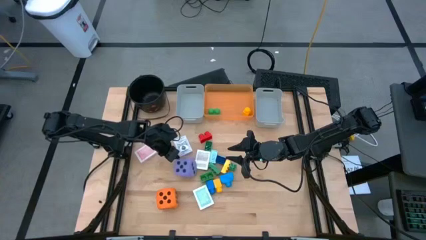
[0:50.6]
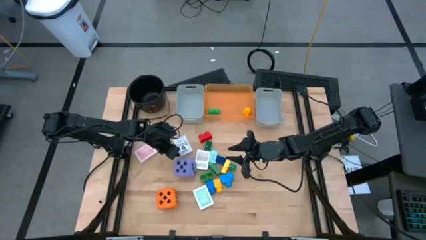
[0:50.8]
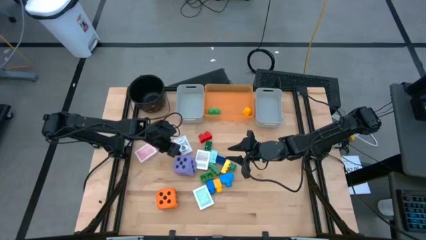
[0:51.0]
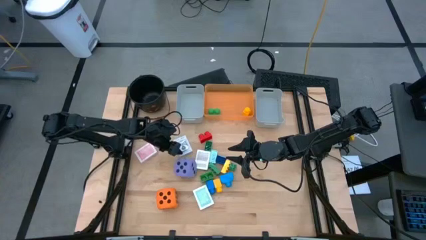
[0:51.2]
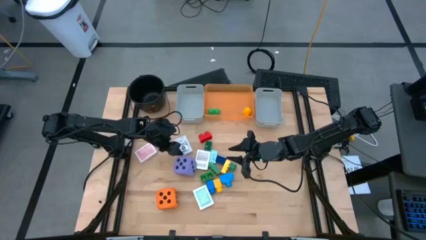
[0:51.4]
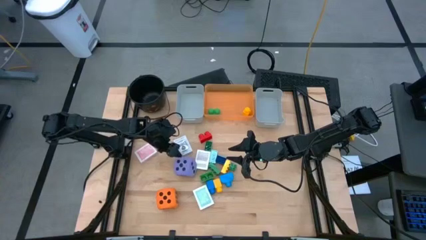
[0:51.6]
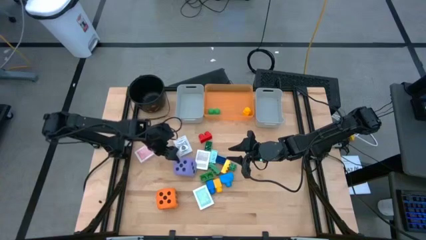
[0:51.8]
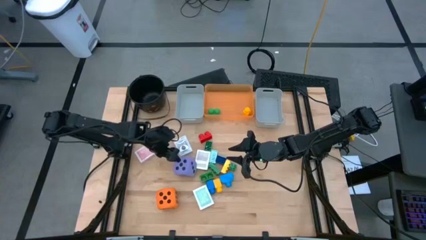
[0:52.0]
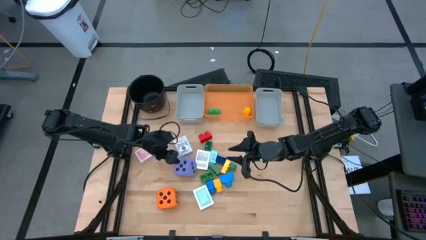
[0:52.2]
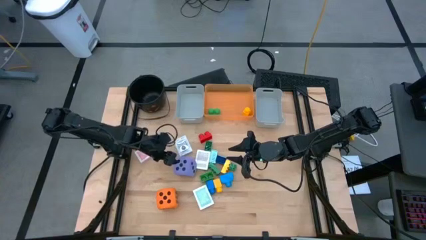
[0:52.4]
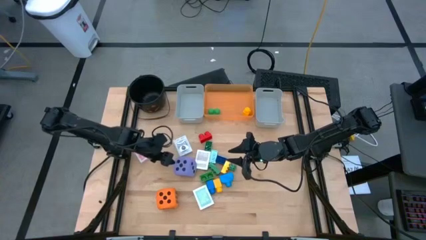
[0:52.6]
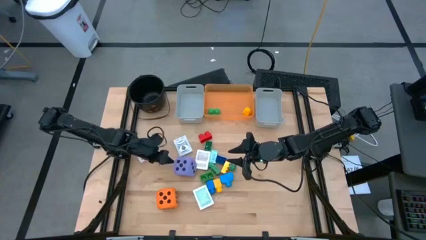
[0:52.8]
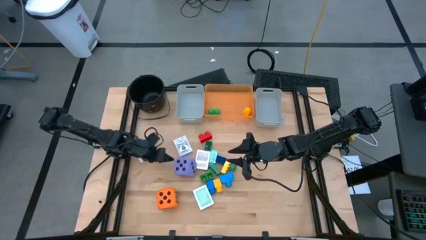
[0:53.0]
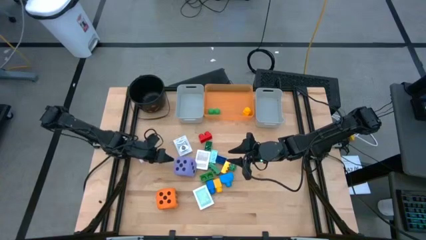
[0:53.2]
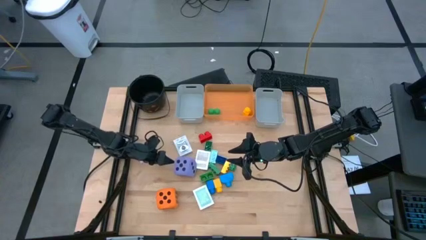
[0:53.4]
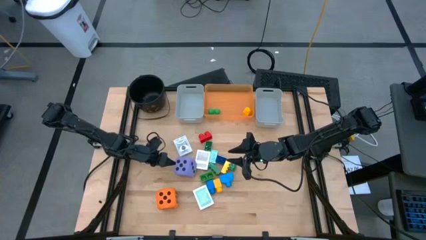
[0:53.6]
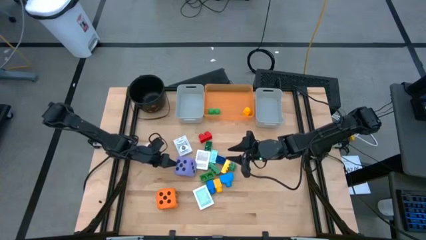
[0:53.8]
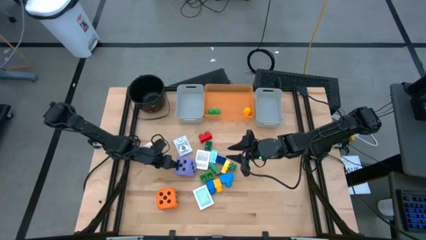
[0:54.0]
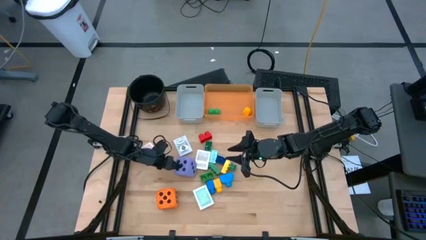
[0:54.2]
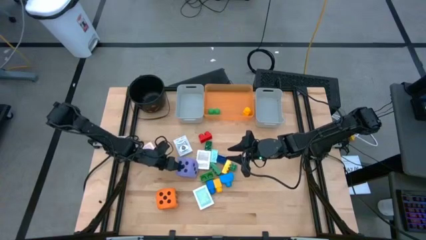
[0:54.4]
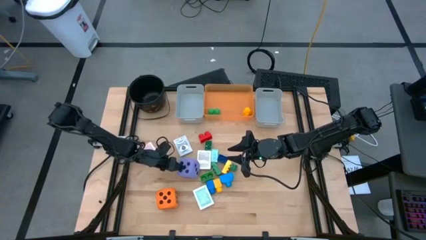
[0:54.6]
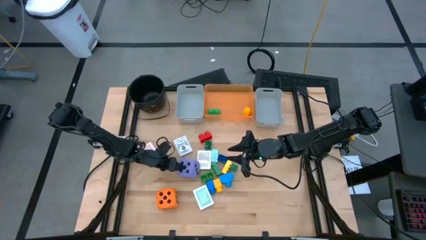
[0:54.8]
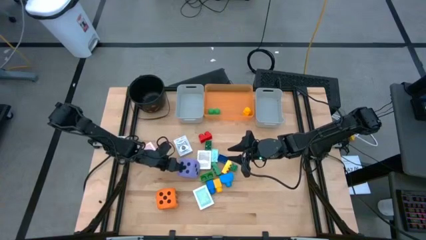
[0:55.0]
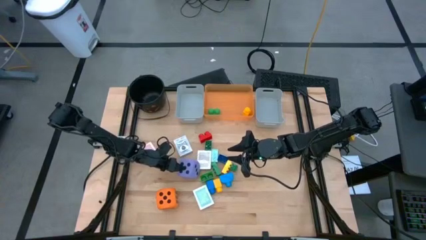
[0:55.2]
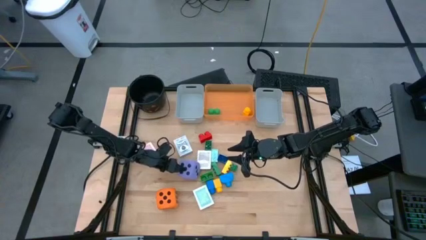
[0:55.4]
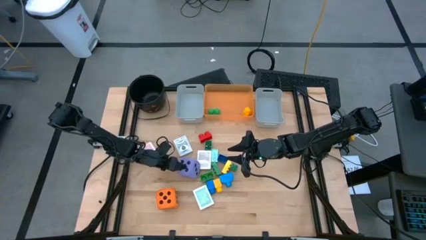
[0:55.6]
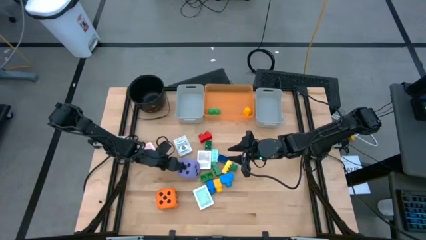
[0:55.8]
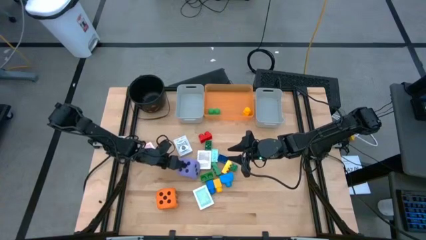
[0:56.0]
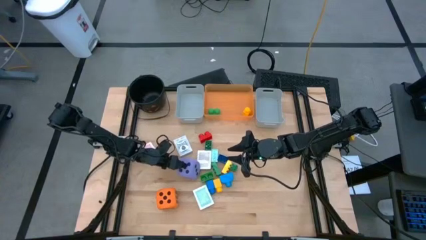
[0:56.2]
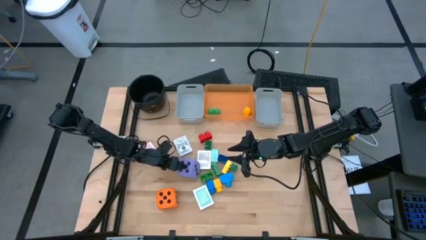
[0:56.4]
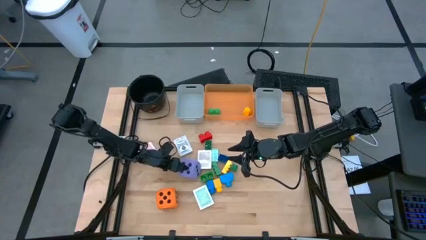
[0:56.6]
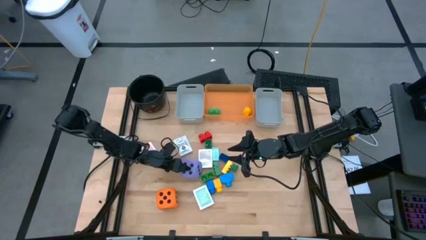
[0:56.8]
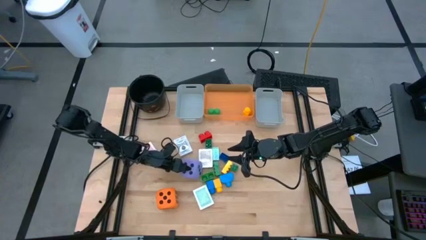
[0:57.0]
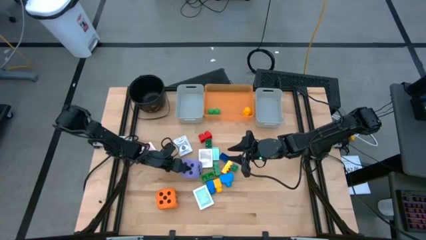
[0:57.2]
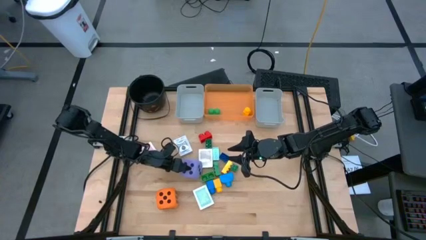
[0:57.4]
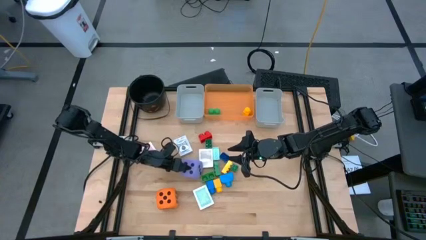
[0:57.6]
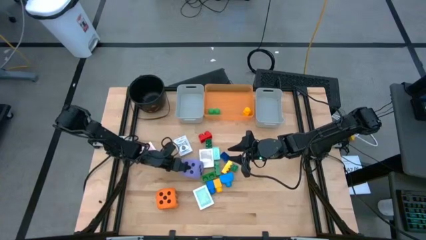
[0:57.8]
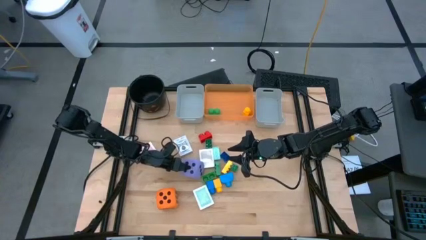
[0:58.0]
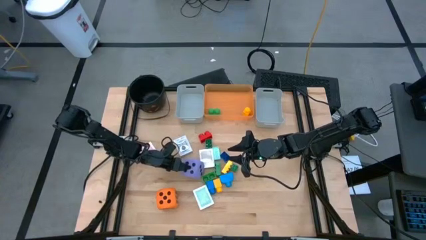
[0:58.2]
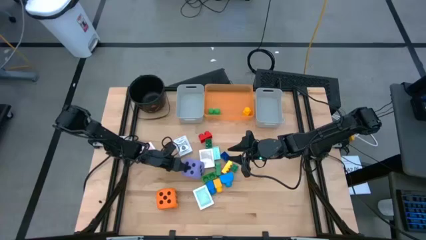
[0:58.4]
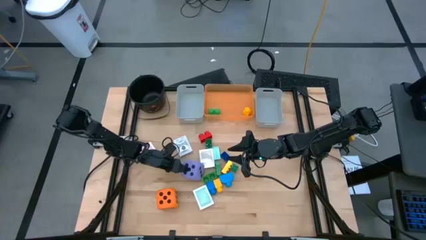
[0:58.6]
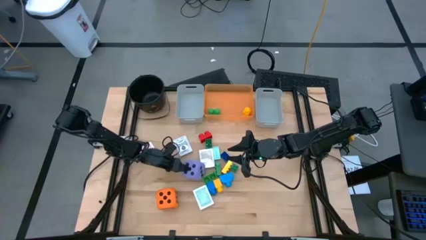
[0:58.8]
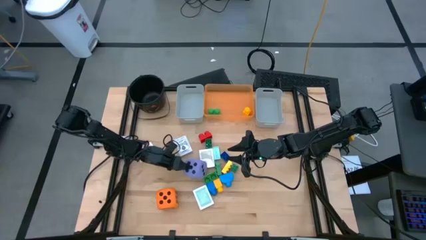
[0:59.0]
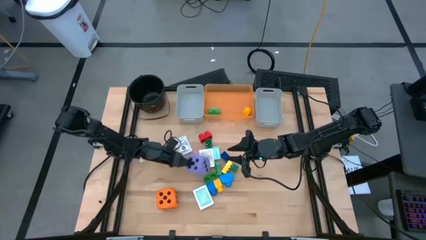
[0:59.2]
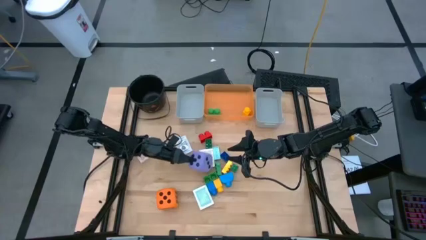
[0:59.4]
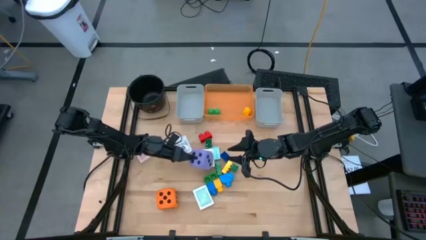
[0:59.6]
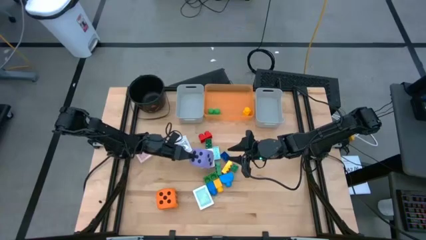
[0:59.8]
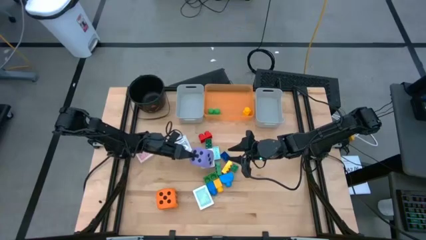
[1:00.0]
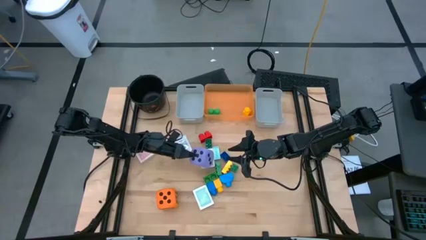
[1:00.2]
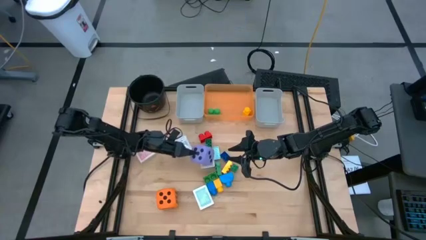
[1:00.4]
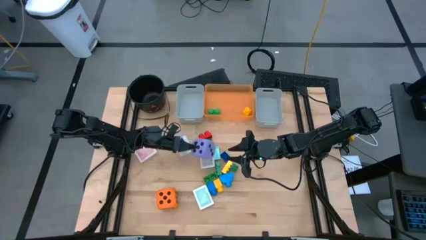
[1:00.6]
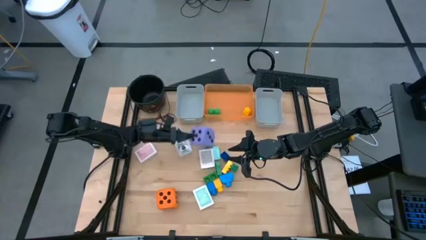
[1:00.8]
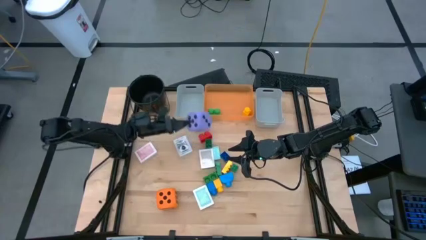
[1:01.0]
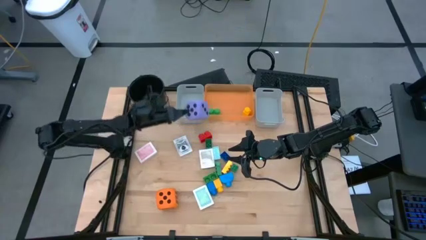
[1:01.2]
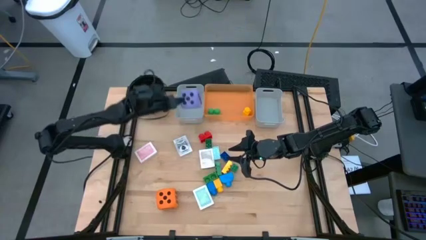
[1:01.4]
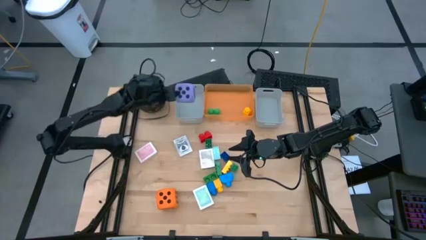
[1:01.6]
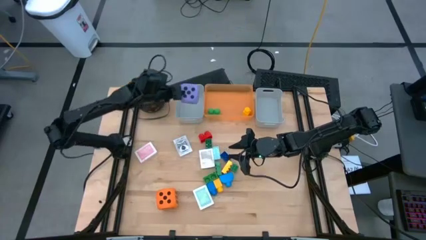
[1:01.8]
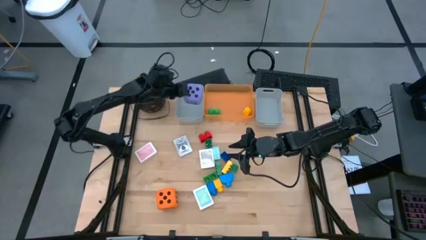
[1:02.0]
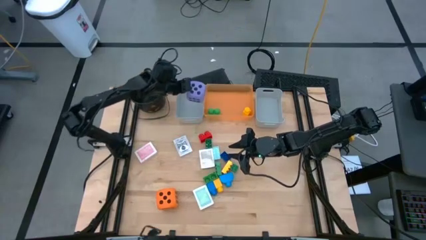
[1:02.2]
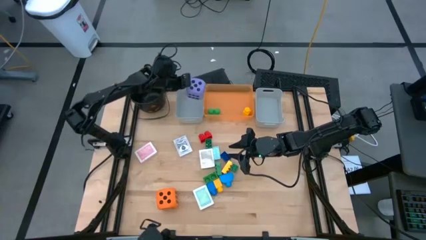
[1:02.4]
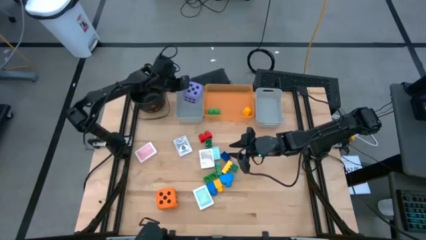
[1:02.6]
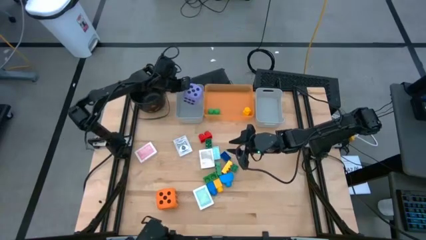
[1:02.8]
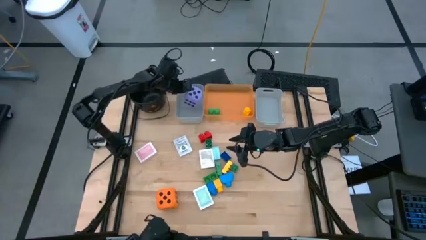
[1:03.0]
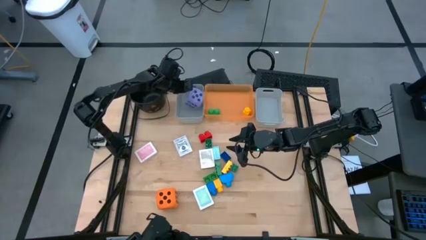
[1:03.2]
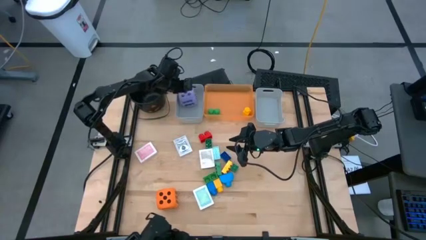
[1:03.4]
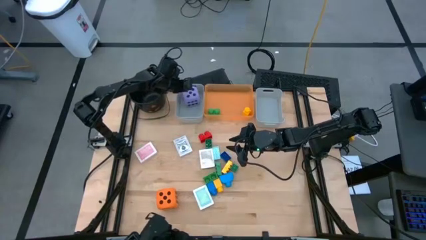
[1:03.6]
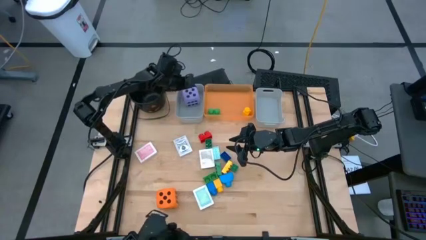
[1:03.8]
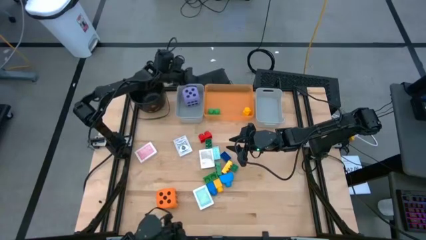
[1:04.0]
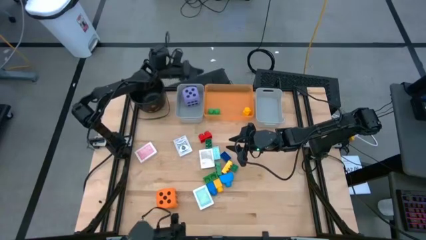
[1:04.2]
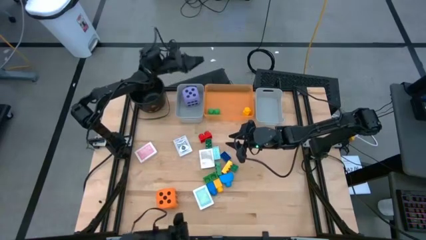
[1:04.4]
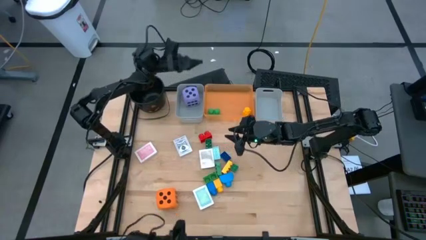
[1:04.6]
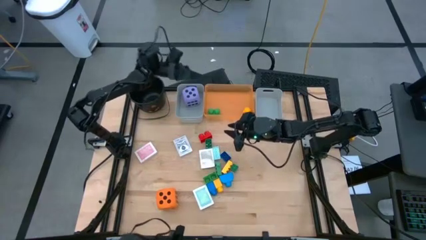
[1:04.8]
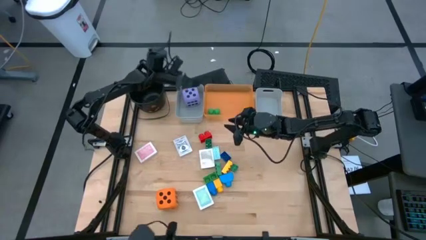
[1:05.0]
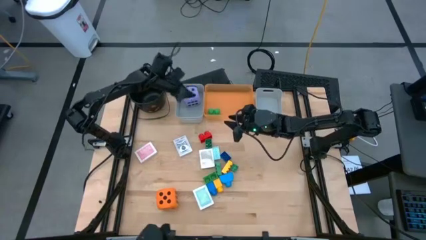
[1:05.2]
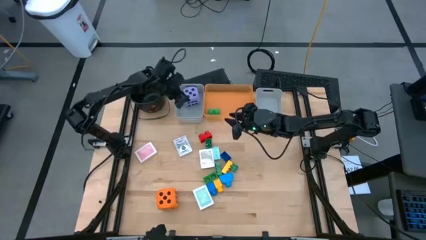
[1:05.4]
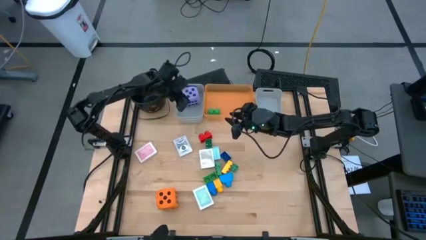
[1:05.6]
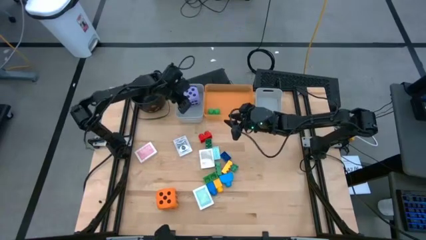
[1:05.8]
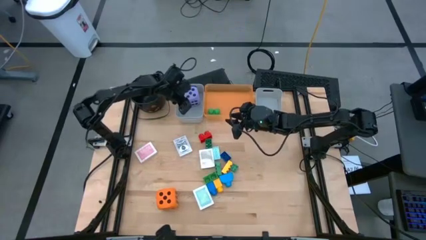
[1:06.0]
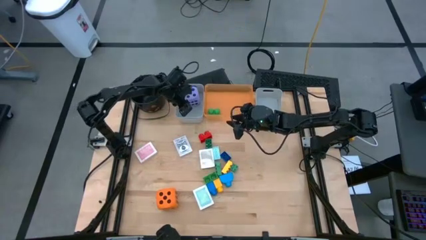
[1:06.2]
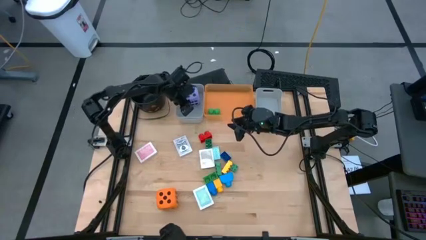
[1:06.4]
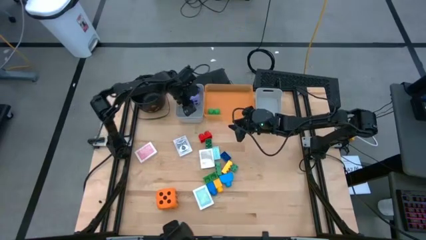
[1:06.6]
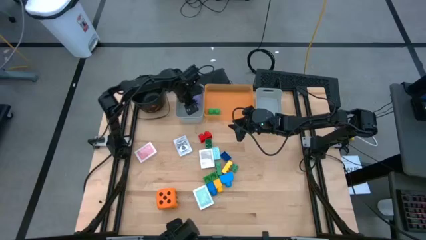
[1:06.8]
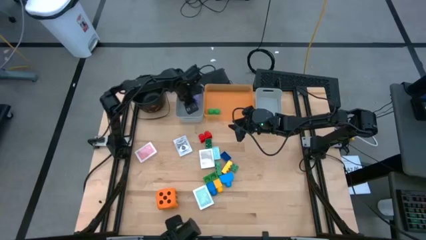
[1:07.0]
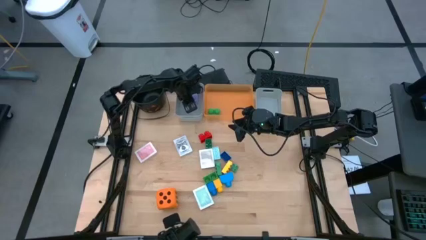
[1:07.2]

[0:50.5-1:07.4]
Task: Pick & Place Toys
Put the purple dice into the left gray bin
